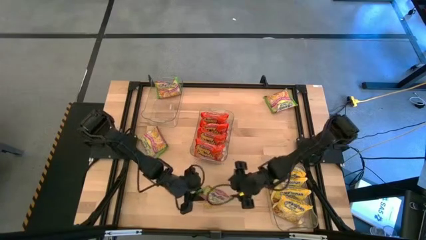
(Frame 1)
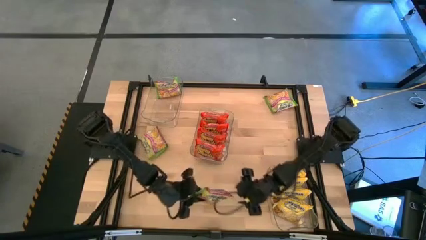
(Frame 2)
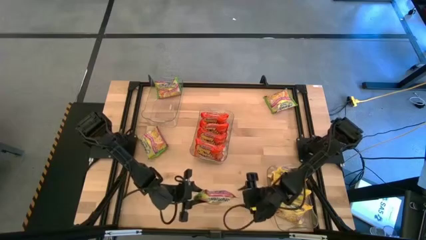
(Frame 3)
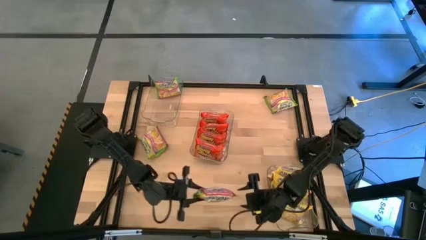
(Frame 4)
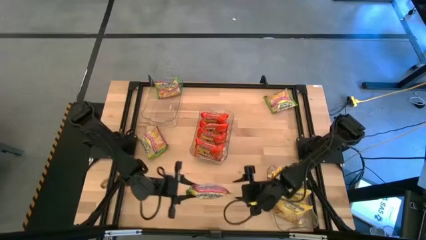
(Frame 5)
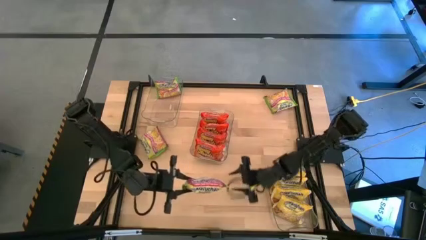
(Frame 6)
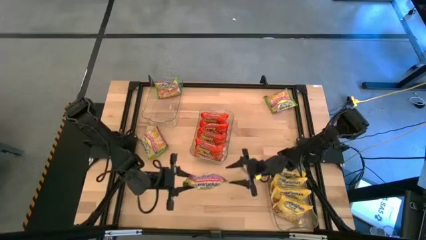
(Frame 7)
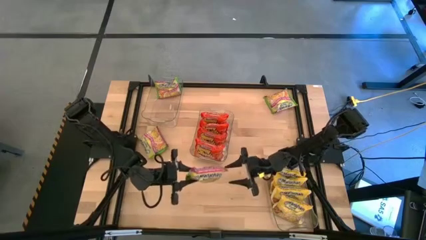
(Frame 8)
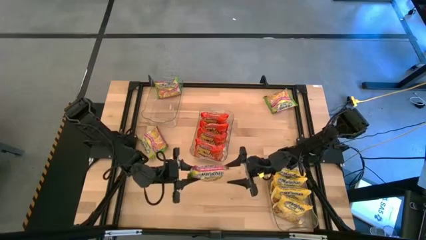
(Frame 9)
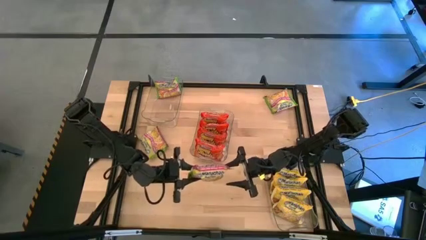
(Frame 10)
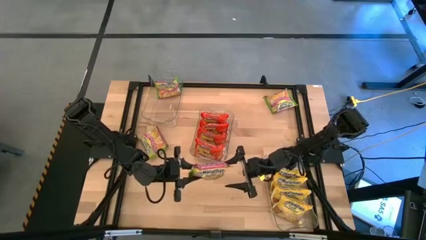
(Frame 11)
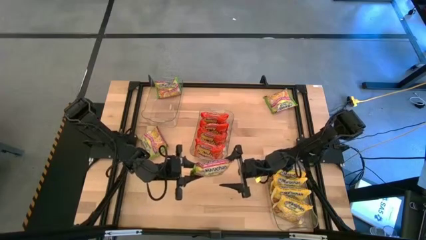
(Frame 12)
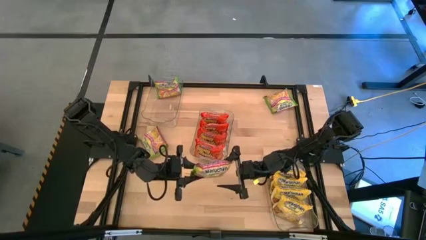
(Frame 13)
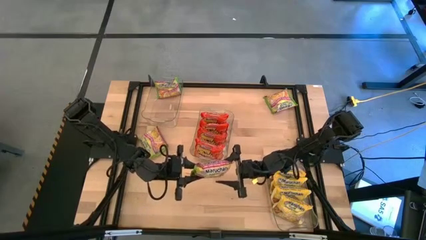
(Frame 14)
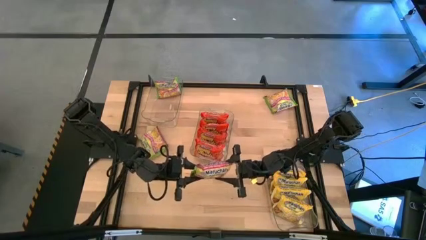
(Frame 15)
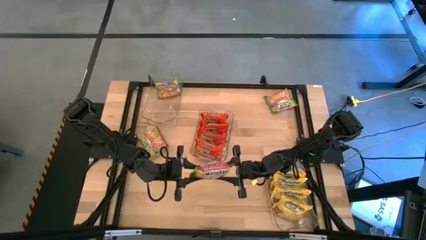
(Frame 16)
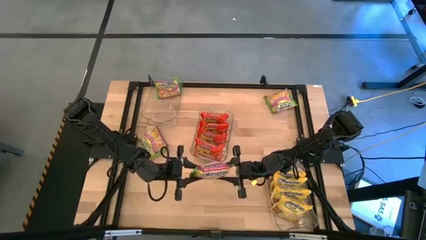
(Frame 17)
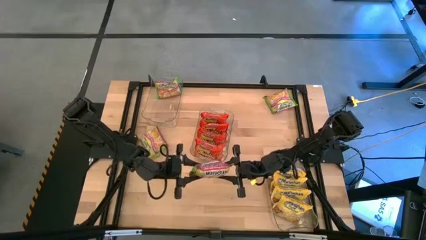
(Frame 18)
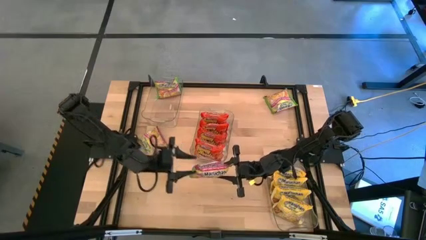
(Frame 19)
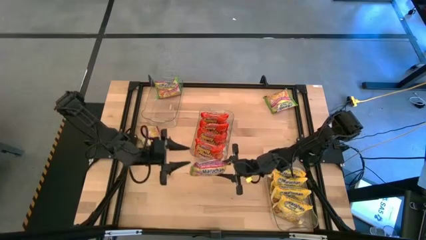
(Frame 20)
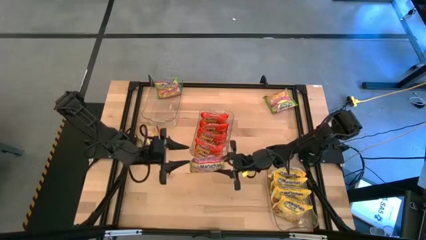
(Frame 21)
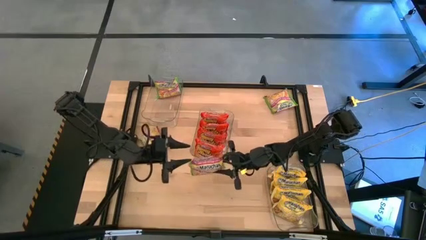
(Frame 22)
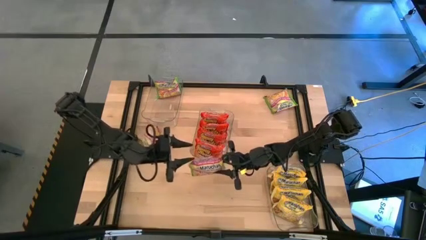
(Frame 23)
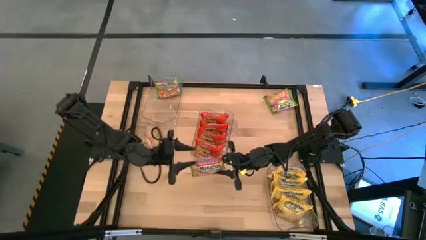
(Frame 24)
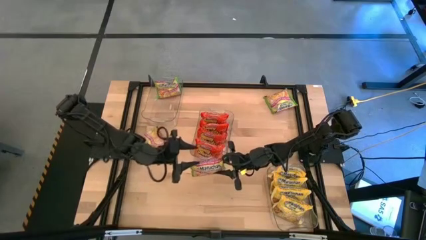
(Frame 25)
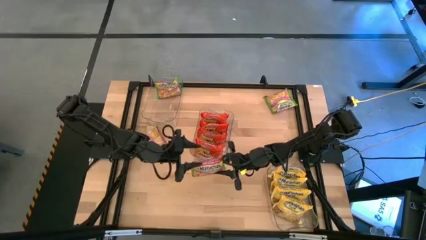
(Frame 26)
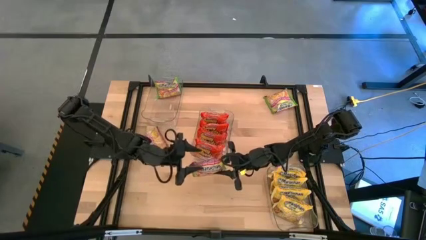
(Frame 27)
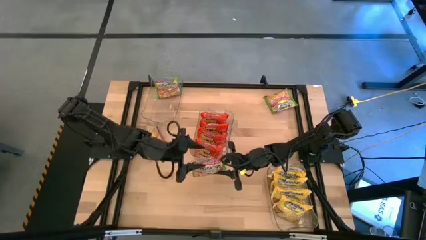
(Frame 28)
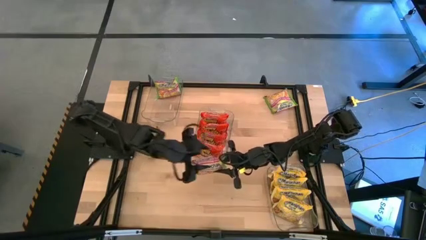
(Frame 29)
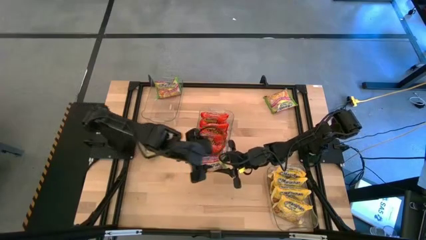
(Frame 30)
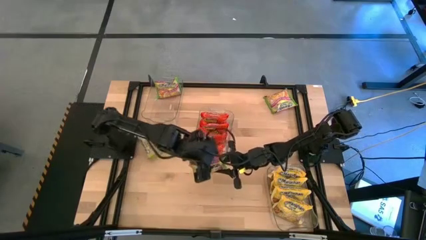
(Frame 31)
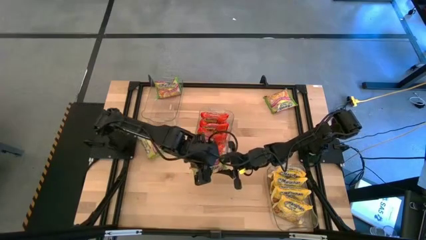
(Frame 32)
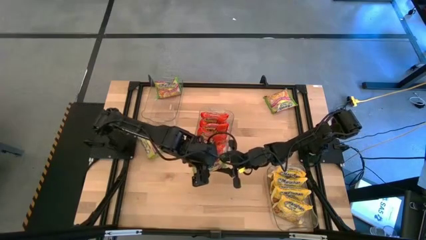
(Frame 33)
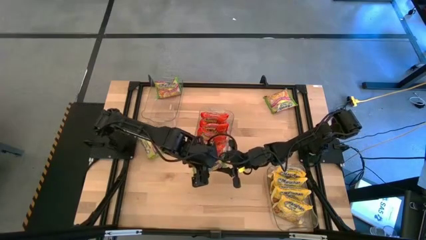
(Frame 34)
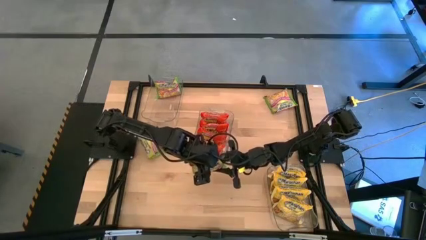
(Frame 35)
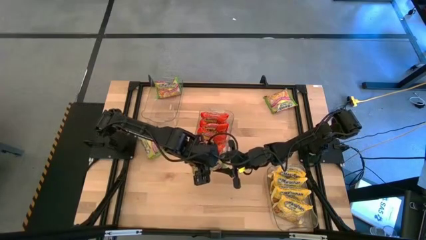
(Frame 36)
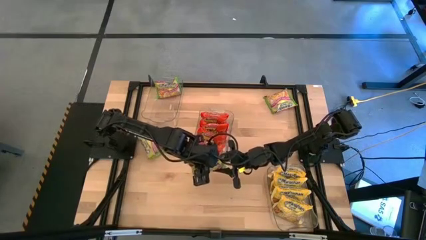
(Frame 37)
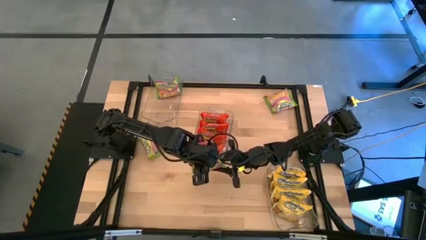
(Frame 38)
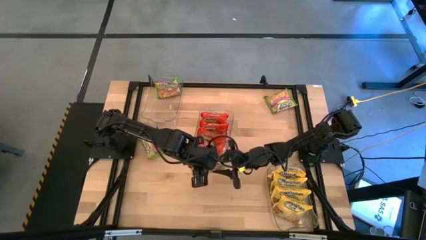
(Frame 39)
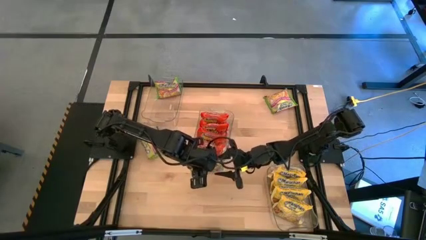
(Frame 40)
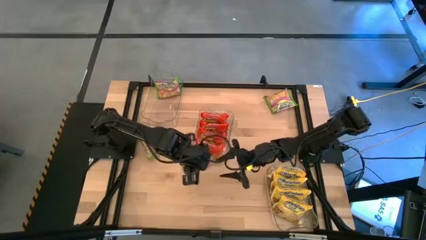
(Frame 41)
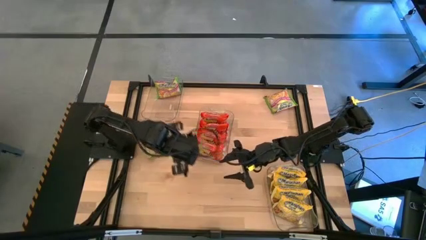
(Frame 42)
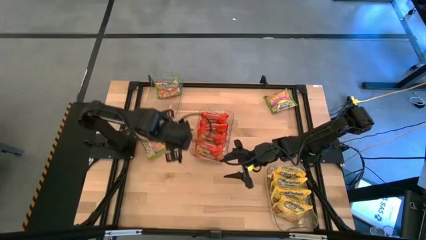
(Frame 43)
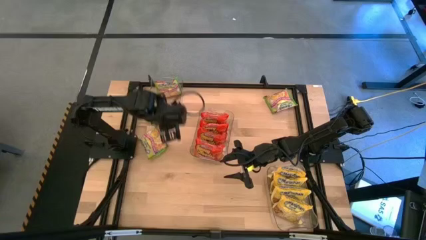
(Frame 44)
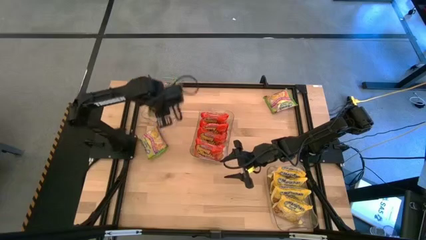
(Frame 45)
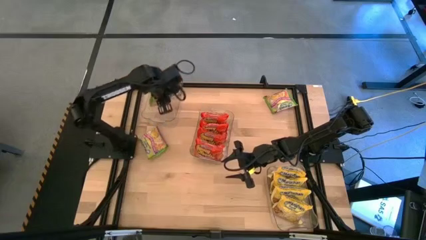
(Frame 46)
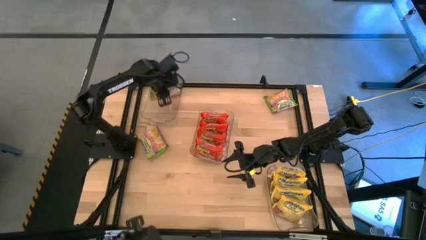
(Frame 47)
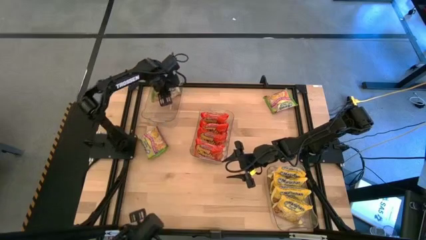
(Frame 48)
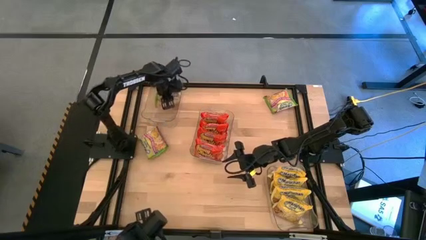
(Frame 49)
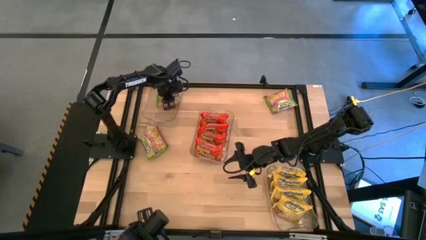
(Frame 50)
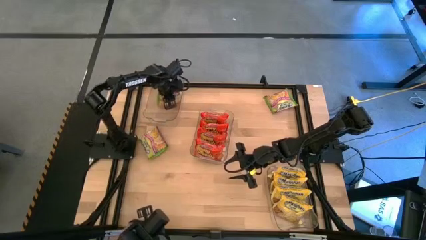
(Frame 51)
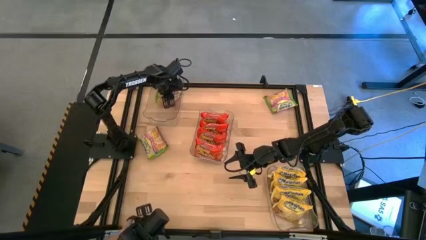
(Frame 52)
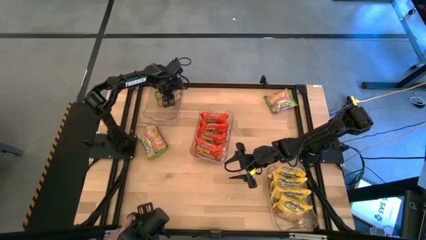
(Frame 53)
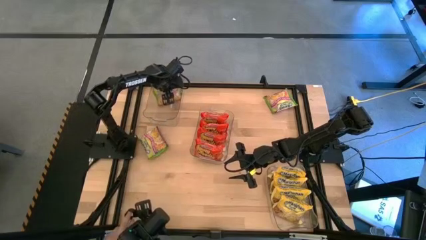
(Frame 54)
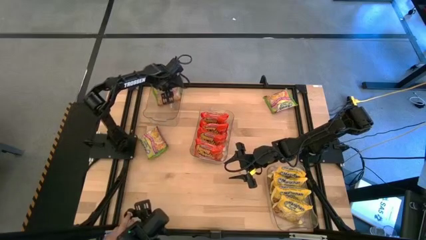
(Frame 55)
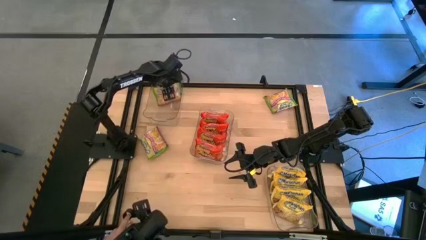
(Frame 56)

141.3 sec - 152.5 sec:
Task: Sort Maruchan noodles
Put the bottom green noodle pack into the top transparent bin

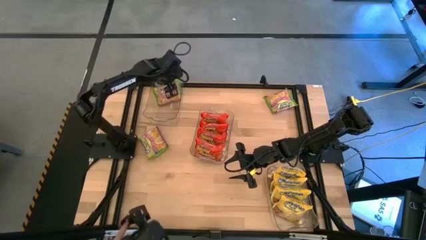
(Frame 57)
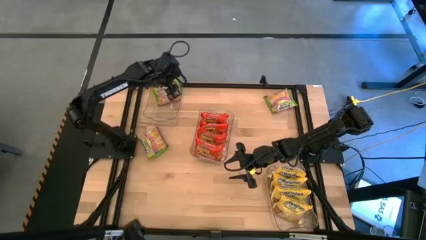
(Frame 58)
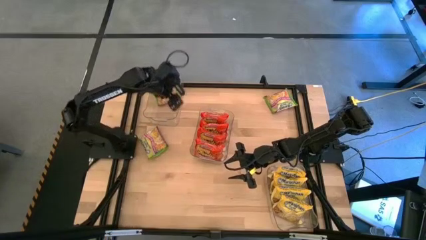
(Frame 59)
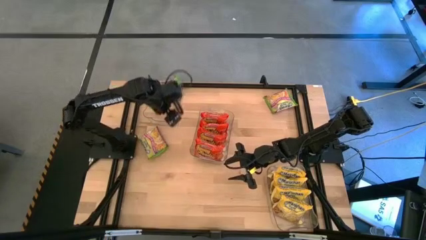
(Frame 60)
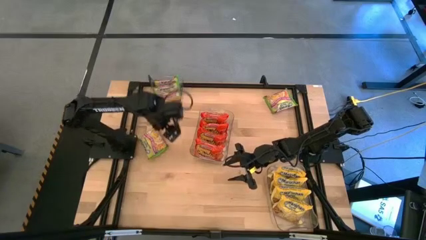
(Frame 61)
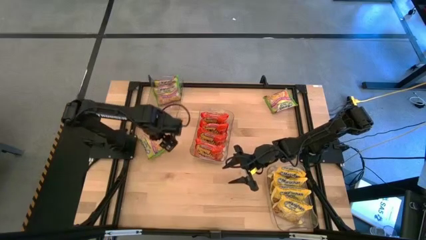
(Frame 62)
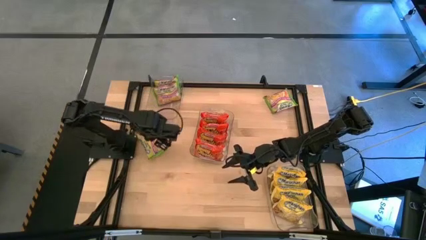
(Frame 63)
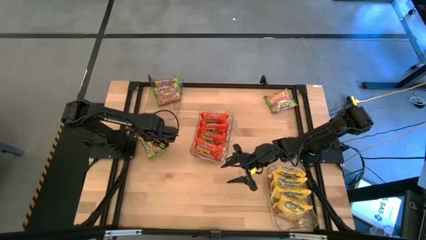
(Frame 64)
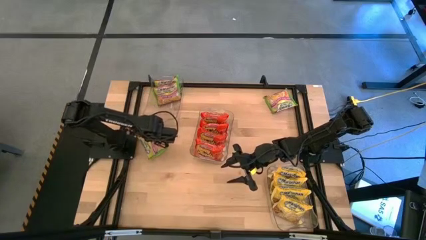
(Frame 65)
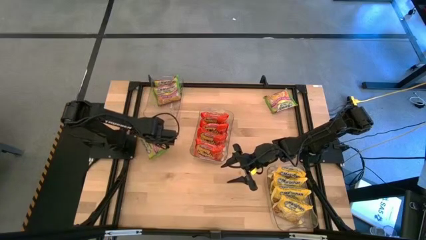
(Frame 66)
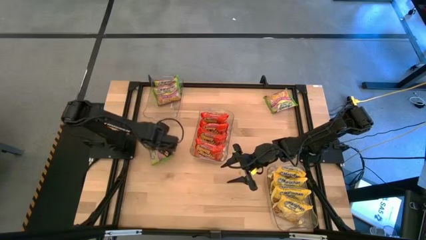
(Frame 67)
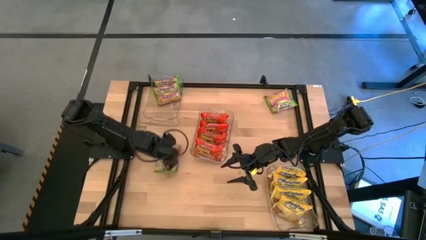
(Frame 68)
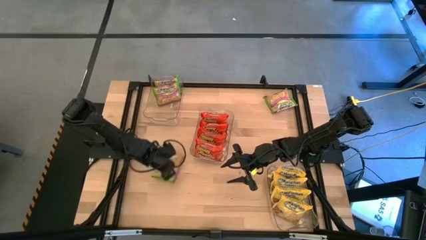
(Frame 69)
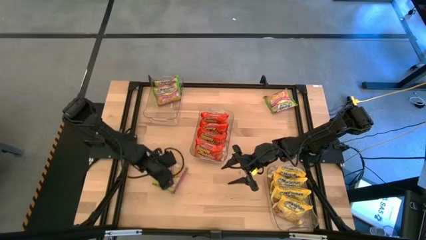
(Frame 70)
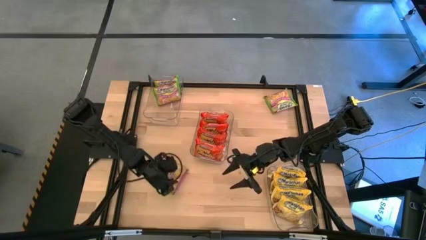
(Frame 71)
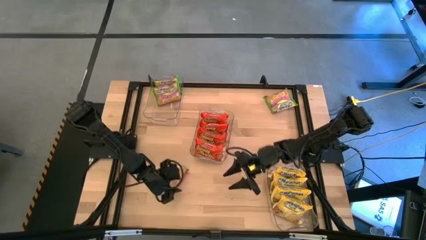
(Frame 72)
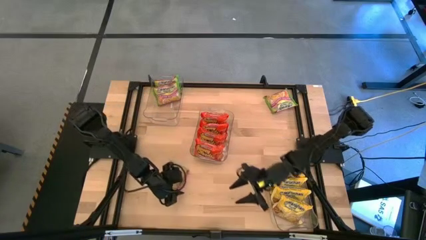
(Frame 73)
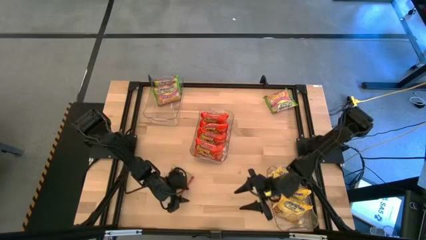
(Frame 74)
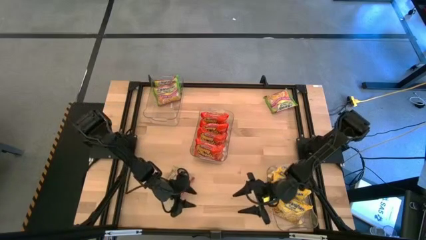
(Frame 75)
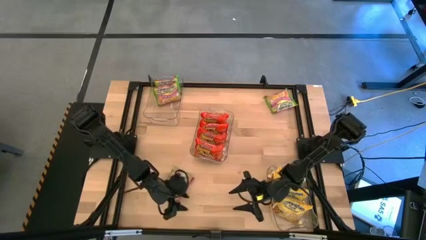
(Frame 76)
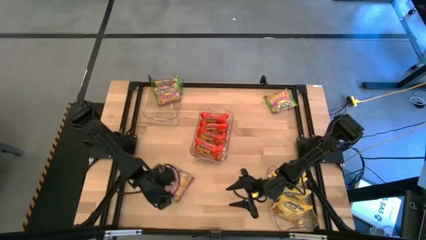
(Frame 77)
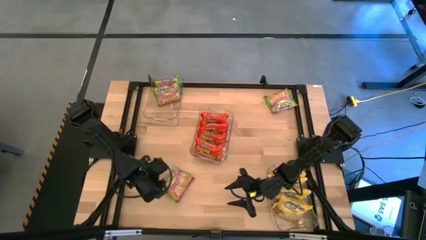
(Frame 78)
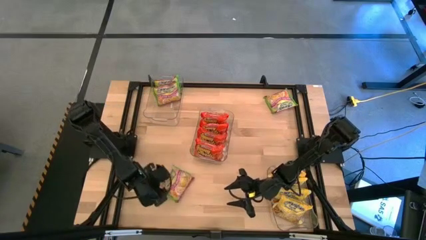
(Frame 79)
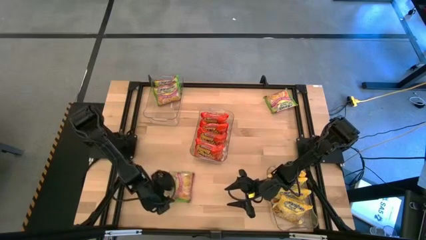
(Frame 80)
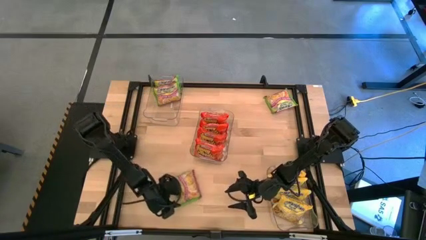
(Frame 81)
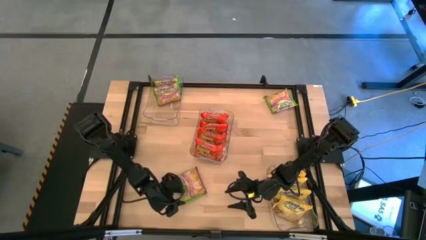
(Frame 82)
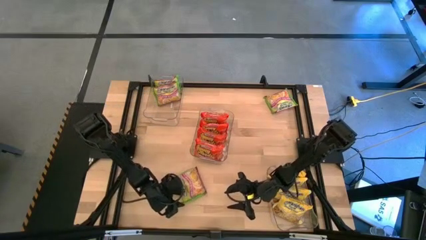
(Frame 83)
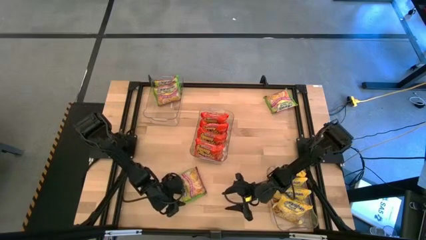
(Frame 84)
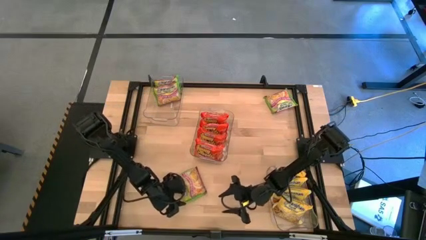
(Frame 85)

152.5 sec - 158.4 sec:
Move the green noodle pack on the table
